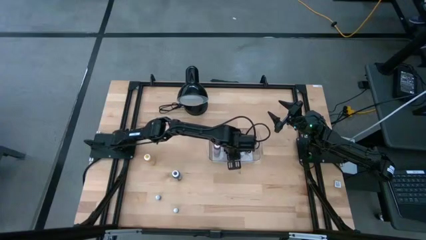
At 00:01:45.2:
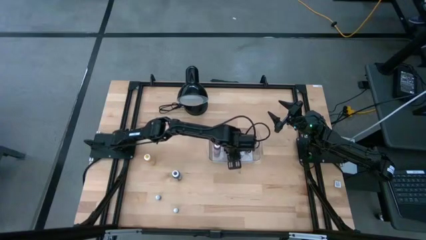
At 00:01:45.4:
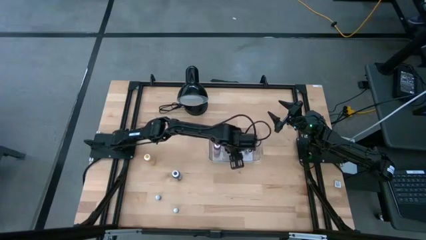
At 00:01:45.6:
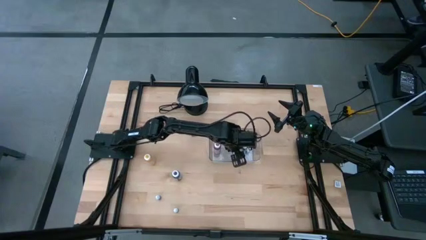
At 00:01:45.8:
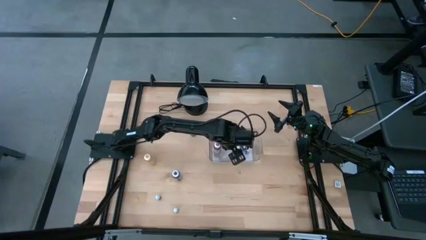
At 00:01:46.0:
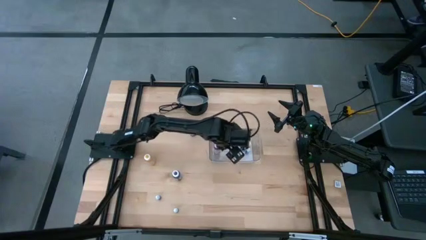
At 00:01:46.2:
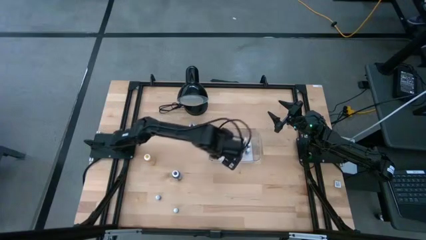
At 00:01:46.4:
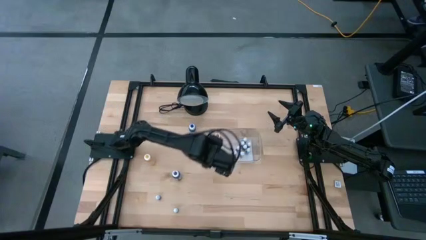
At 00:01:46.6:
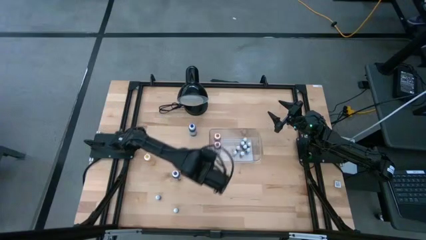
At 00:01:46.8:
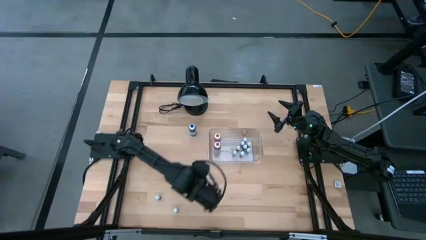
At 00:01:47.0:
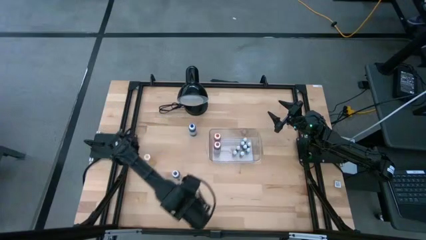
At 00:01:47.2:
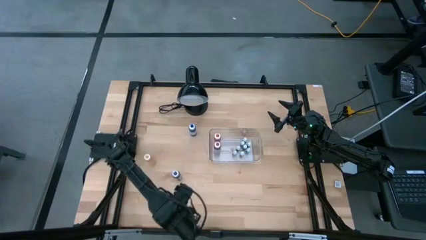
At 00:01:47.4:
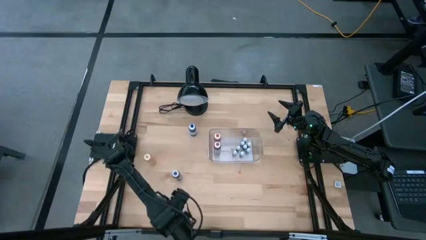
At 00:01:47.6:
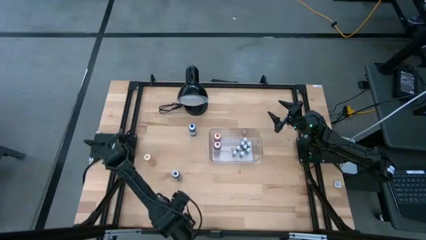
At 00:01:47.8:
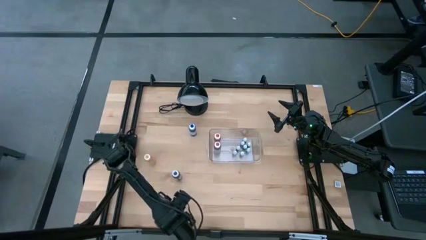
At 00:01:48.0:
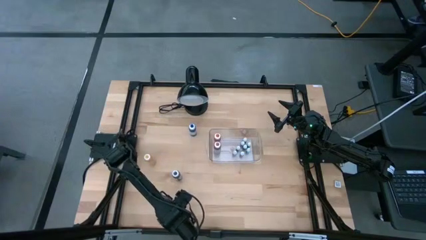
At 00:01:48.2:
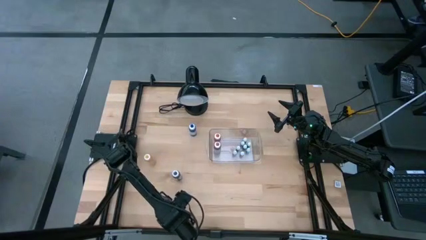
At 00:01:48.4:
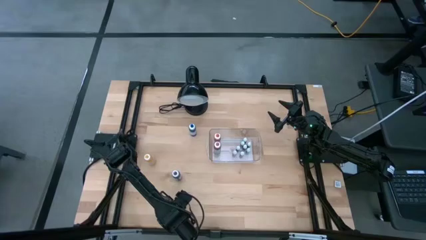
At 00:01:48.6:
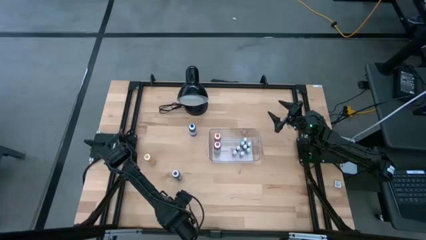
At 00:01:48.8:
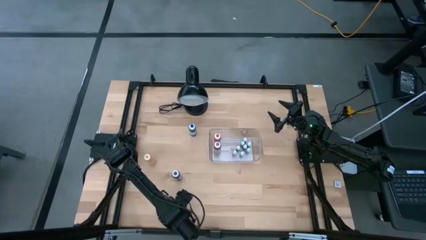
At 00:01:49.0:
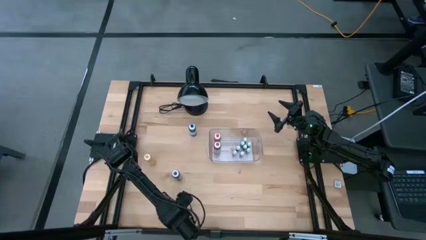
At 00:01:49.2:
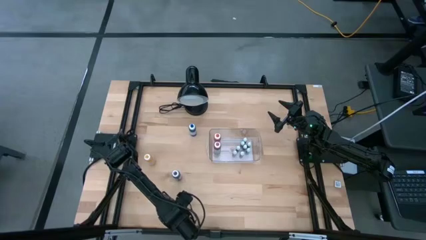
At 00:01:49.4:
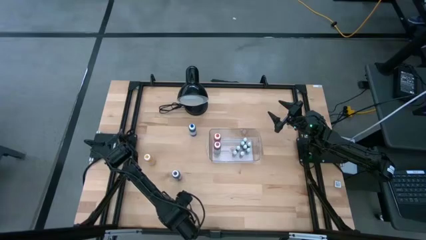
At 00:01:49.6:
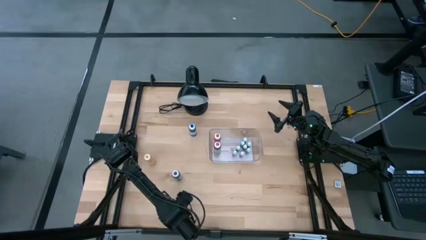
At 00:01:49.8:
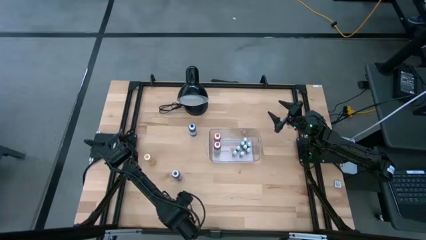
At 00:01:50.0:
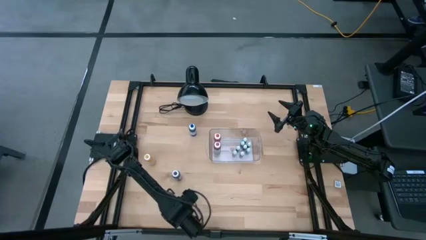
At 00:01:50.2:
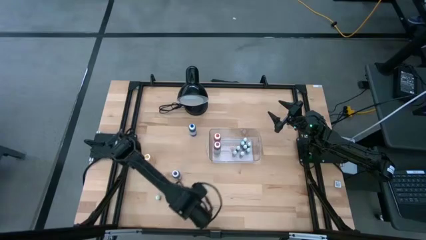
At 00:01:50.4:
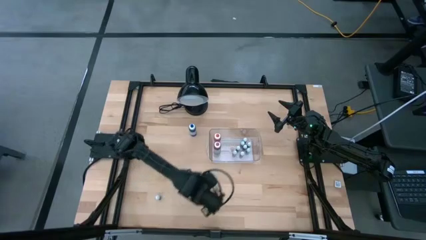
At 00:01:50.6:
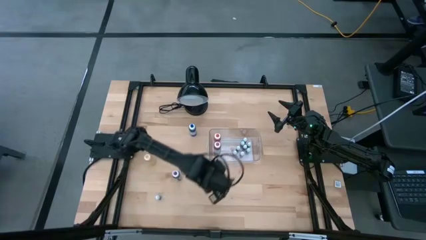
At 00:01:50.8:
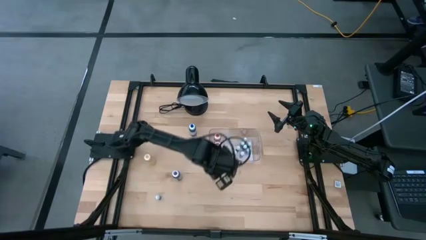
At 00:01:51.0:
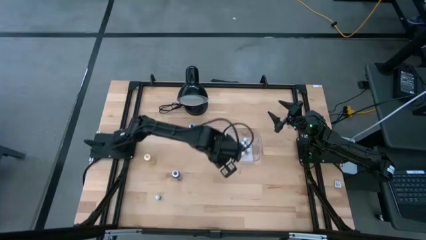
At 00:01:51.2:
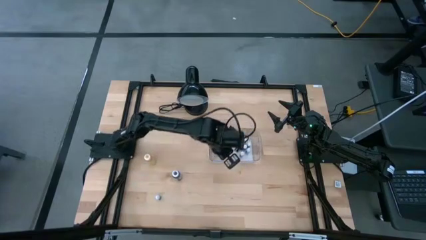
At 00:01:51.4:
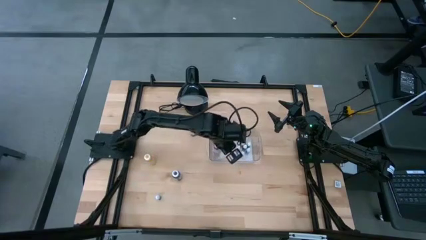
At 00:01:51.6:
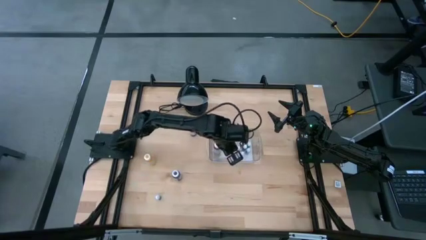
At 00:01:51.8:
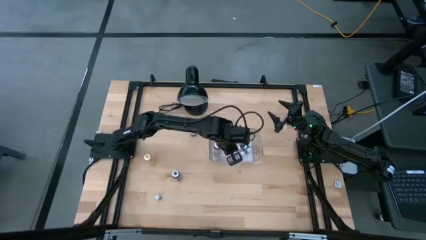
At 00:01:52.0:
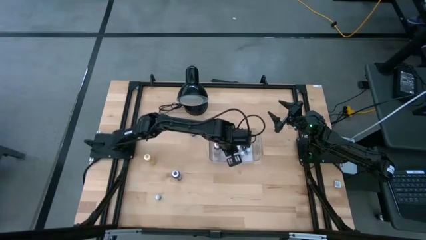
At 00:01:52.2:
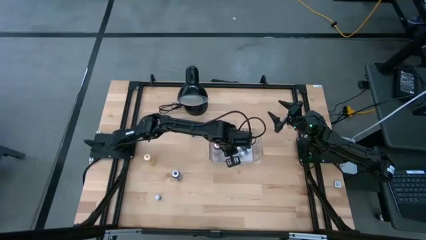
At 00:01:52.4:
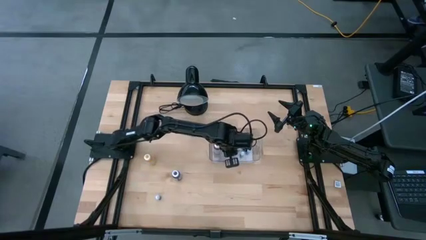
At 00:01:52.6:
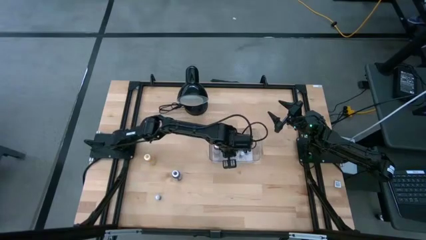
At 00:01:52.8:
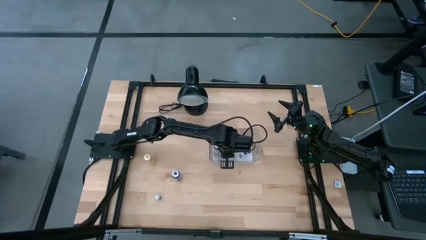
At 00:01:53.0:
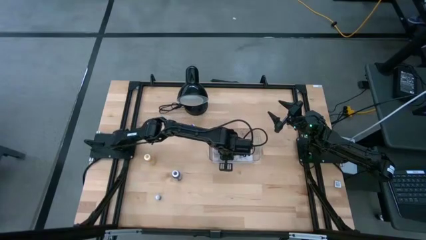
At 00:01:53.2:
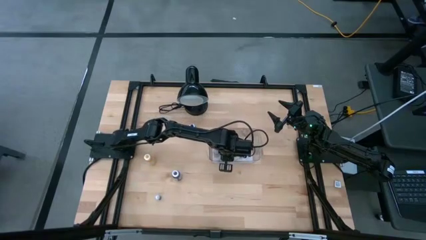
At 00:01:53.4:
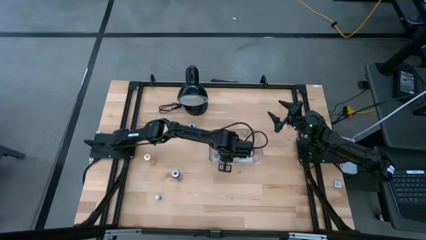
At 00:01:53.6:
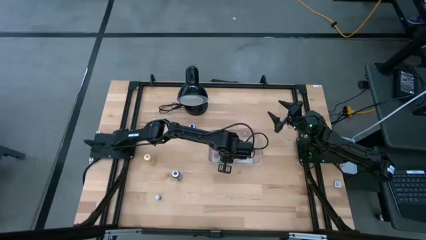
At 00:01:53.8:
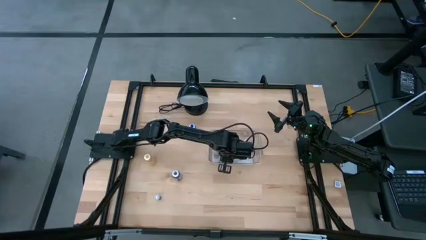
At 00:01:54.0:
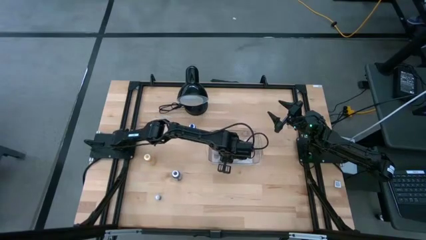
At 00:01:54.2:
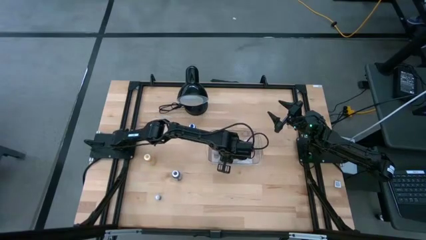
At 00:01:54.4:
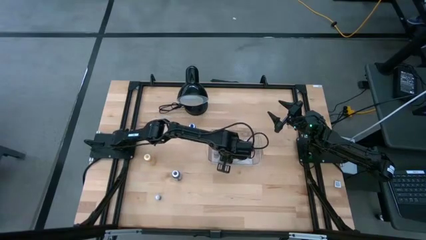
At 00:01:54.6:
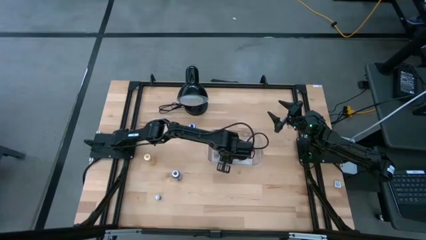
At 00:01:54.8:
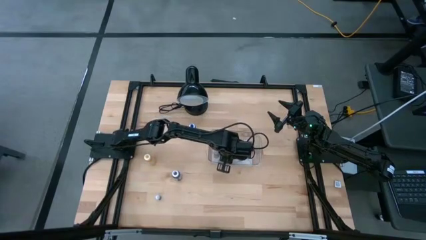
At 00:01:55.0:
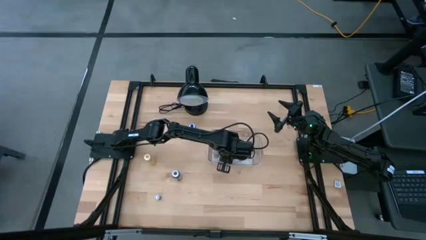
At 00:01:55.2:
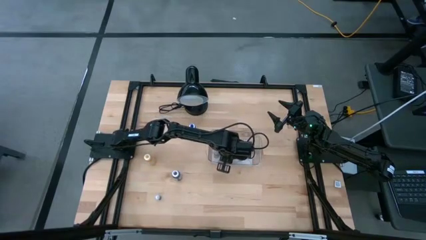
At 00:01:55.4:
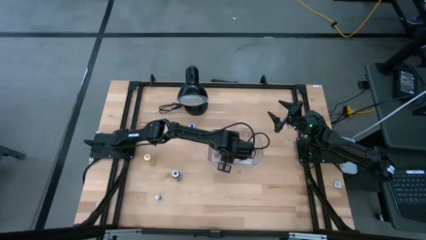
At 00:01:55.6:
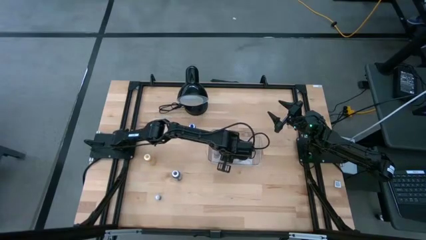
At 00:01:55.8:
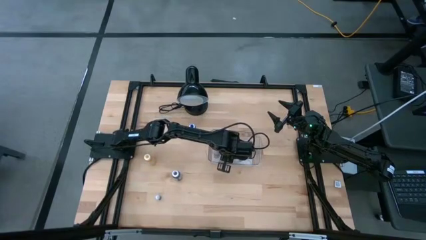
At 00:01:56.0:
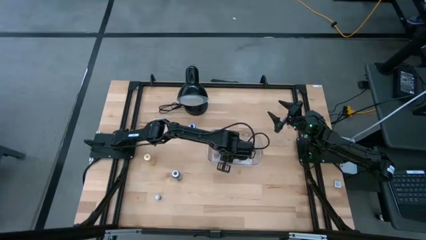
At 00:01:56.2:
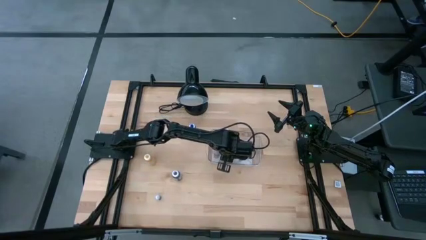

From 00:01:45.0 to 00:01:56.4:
Task: Pick & Place food coloring
Put the small pink food coloring bottle into the transparent bin

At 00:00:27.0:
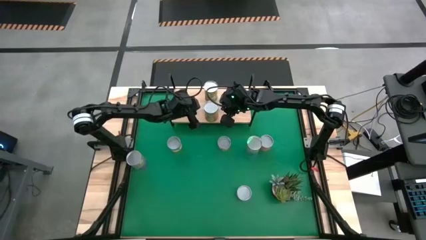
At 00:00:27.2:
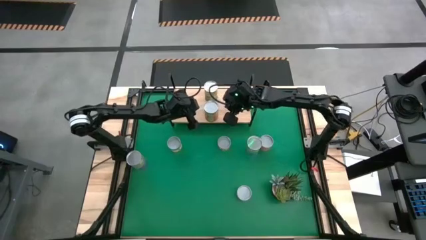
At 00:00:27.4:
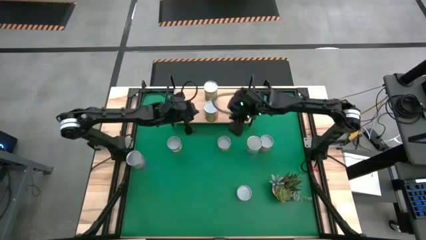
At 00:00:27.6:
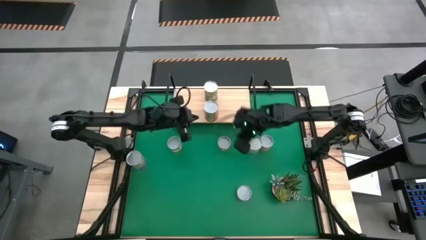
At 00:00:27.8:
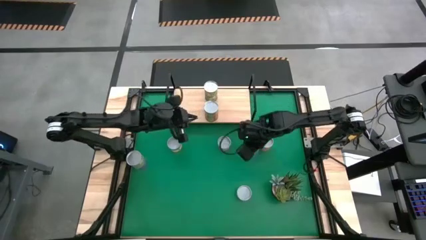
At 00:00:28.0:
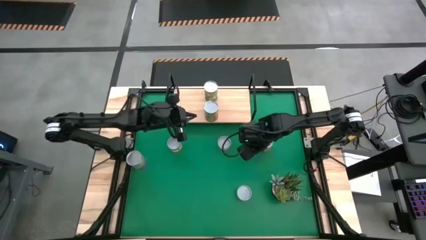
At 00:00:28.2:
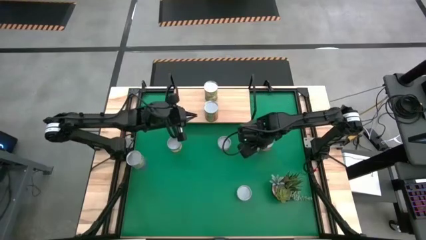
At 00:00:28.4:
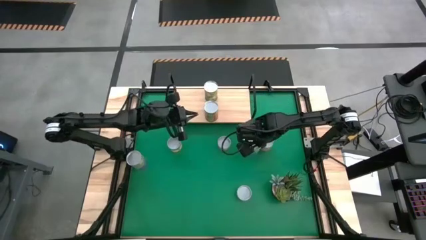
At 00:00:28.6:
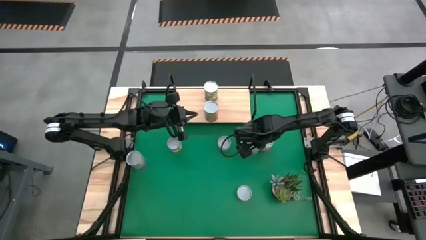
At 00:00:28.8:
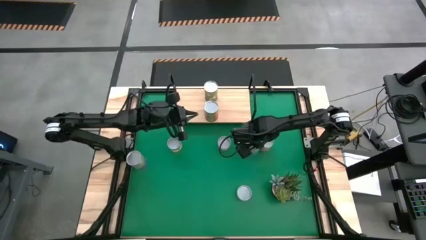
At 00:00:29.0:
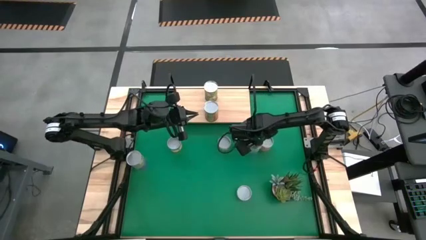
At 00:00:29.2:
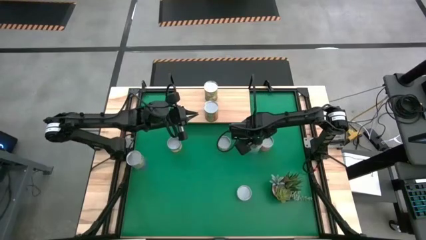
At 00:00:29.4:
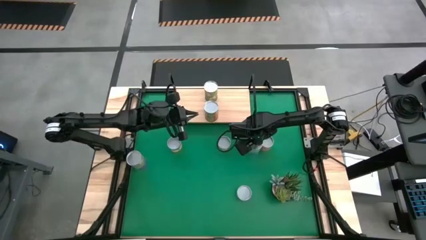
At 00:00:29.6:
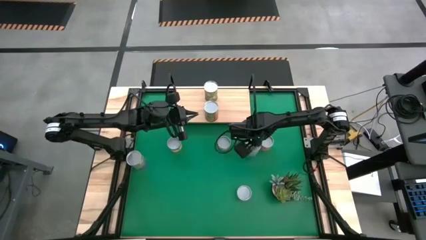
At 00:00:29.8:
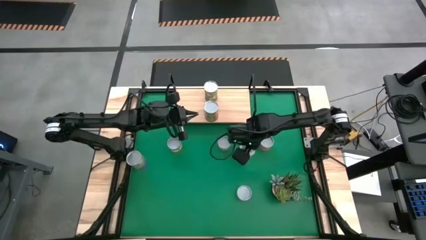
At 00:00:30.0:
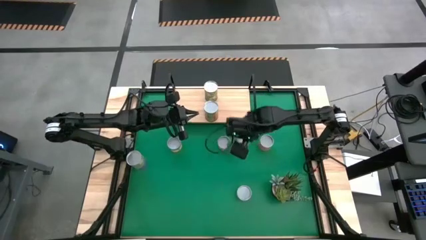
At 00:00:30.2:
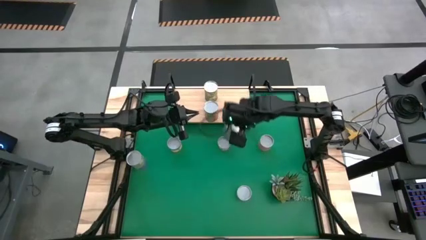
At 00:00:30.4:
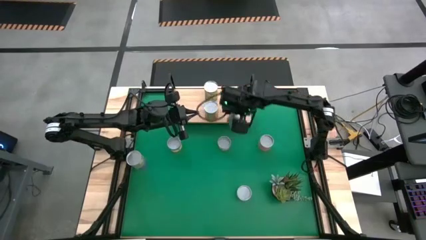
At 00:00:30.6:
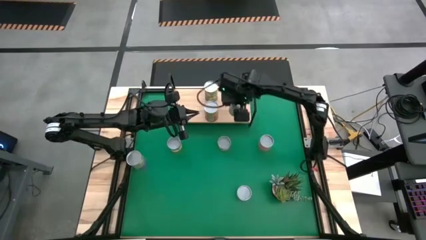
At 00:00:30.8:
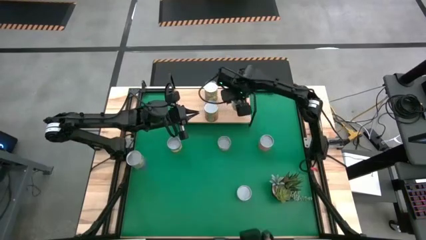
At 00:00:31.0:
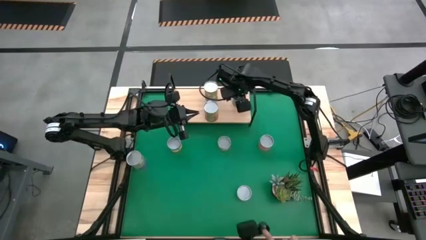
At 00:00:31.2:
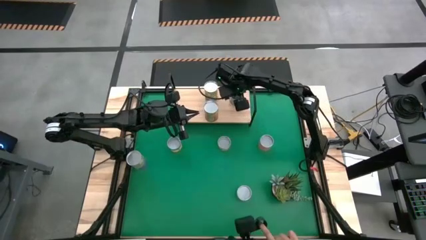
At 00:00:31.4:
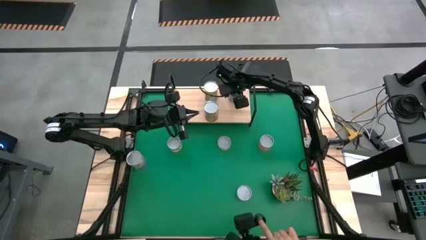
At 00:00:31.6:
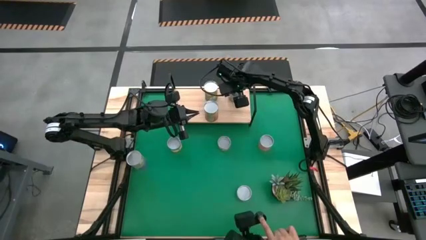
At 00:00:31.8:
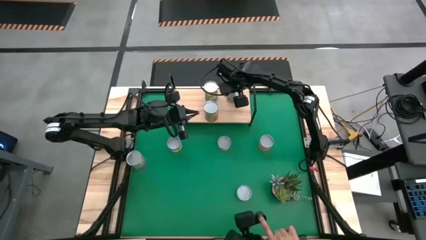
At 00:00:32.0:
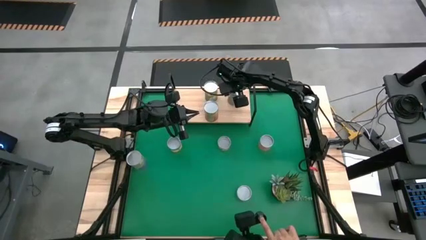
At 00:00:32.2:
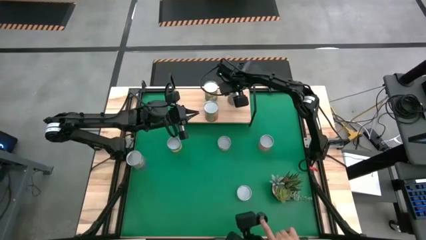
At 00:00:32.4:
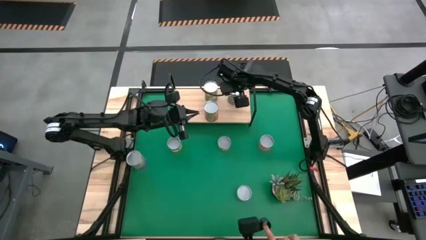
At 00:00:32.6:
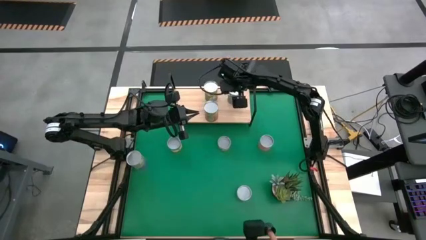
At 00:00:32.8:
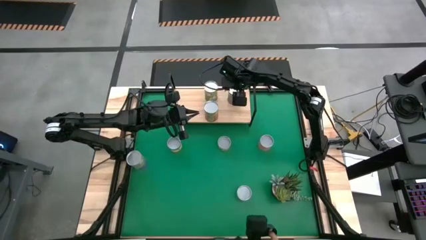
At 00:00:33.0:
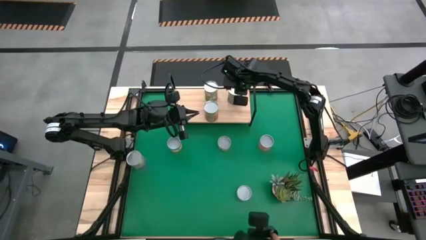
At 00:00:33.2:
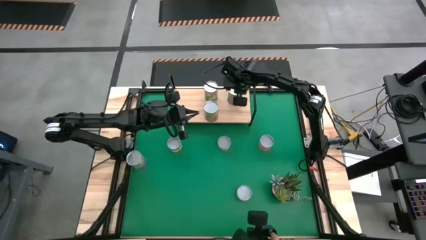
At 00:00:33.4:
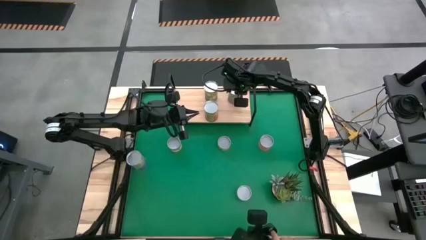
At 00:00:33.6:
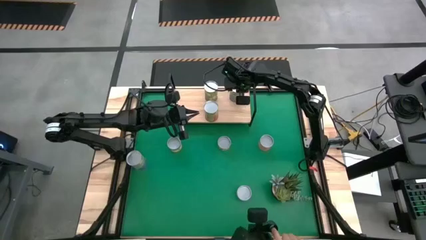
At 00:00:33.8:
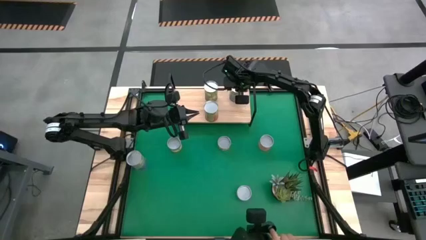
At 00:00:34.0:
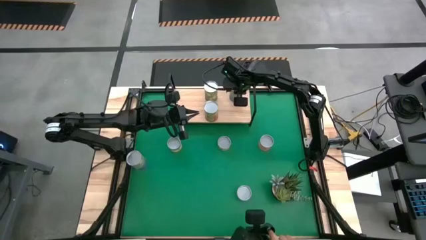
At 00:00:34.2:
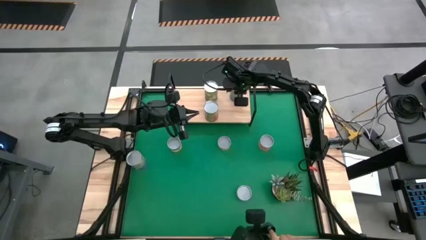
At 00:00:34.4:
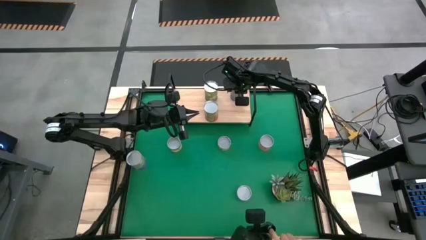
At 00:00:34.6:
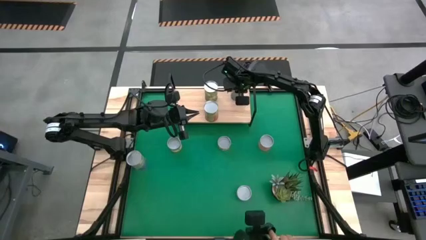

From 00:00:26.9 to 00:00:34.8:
Task: Pick and place cans onto a shelf
Put the canned cherries on the shelf
